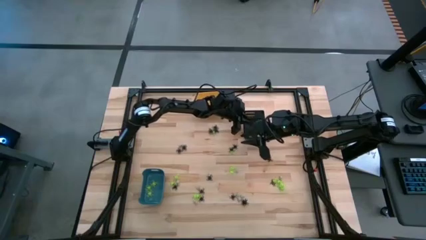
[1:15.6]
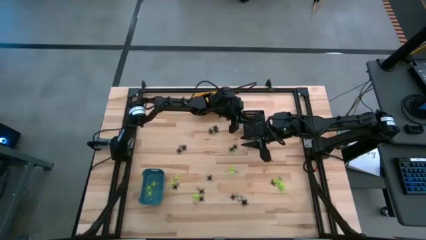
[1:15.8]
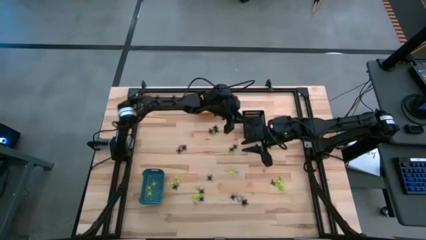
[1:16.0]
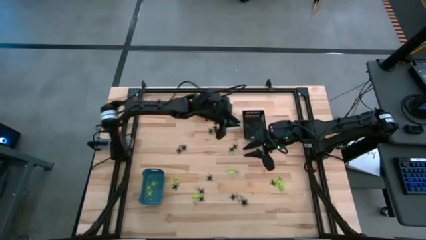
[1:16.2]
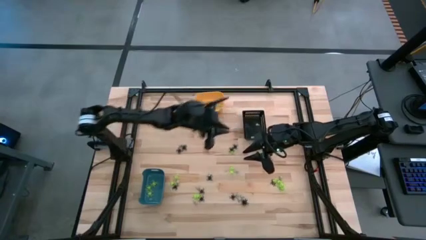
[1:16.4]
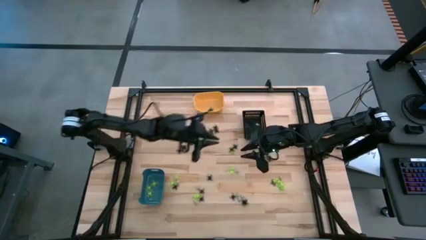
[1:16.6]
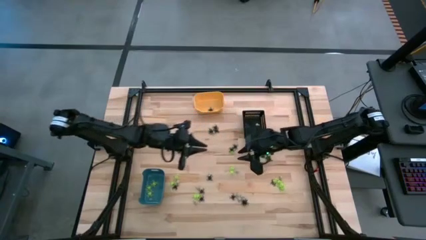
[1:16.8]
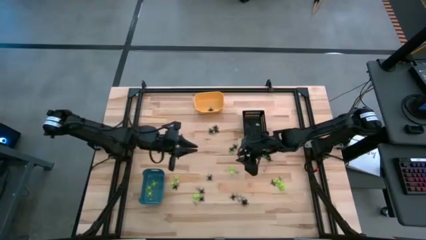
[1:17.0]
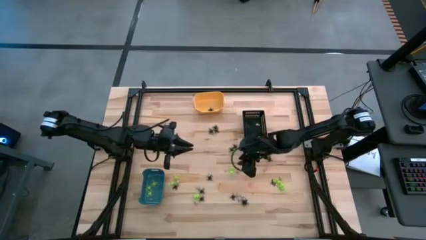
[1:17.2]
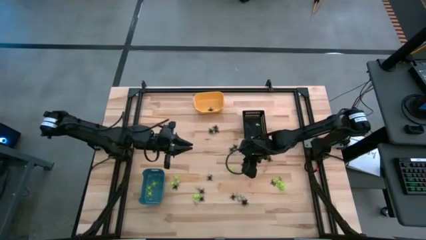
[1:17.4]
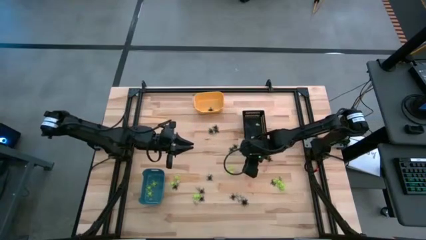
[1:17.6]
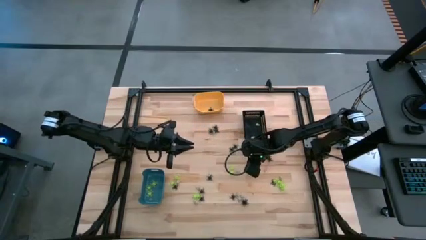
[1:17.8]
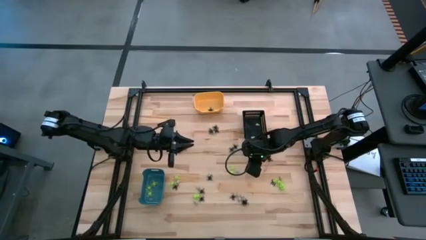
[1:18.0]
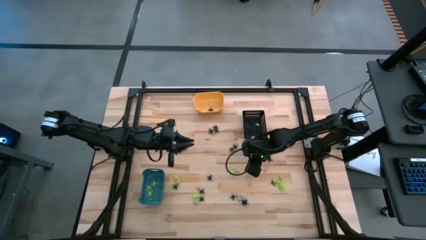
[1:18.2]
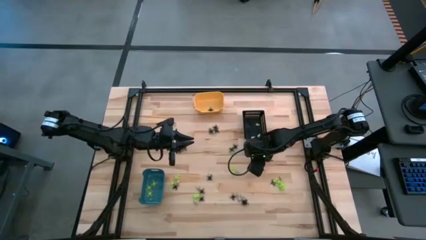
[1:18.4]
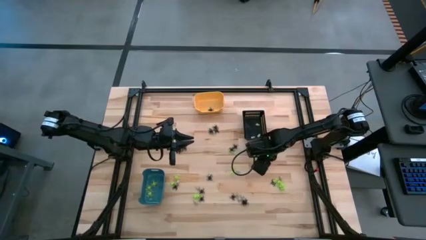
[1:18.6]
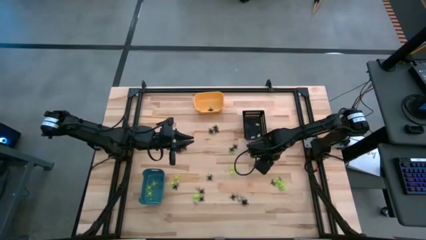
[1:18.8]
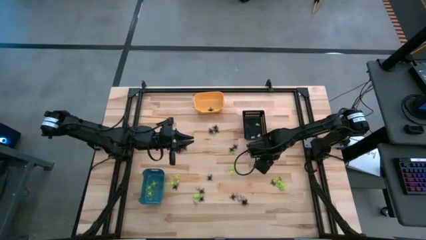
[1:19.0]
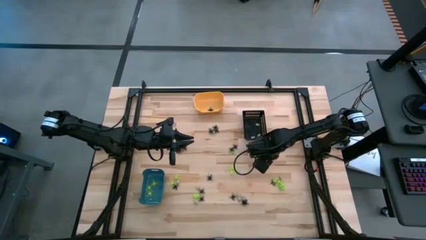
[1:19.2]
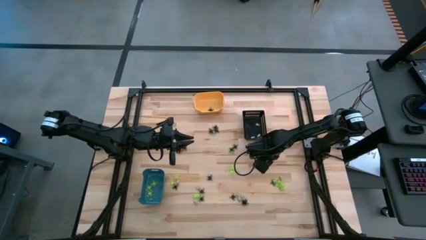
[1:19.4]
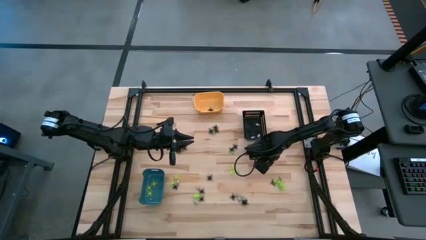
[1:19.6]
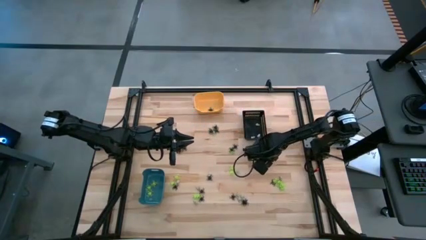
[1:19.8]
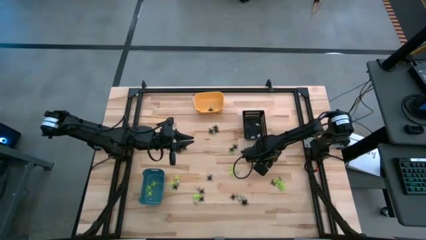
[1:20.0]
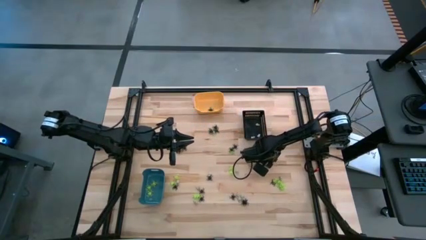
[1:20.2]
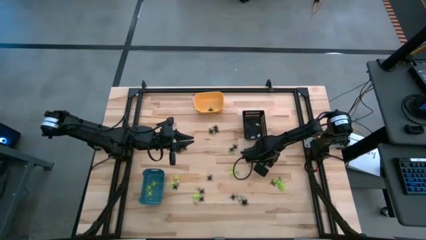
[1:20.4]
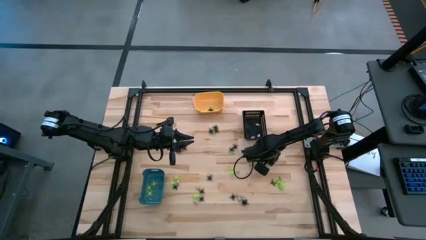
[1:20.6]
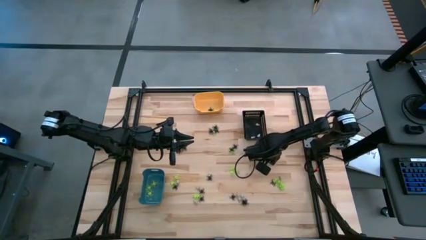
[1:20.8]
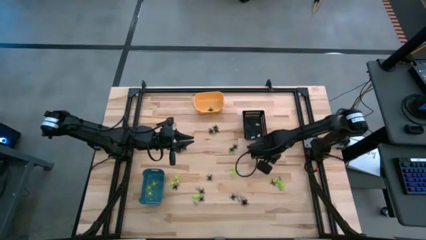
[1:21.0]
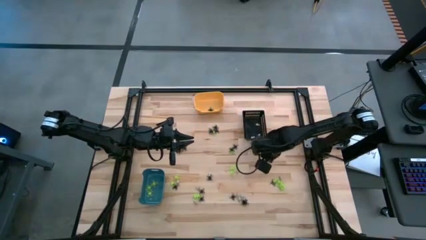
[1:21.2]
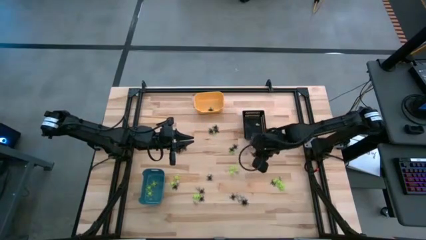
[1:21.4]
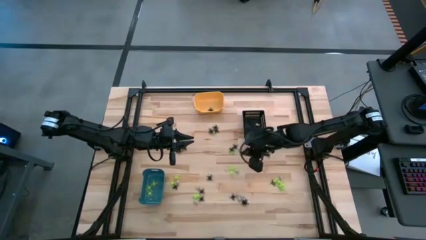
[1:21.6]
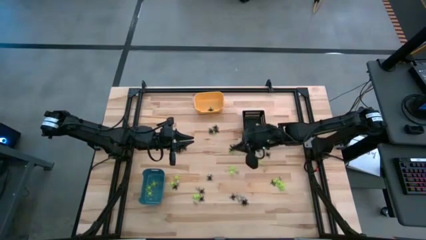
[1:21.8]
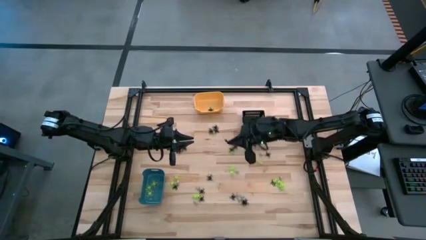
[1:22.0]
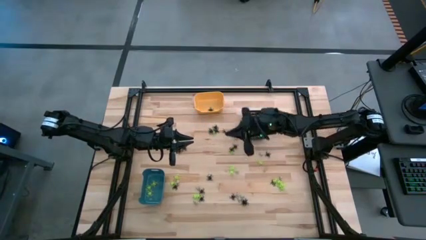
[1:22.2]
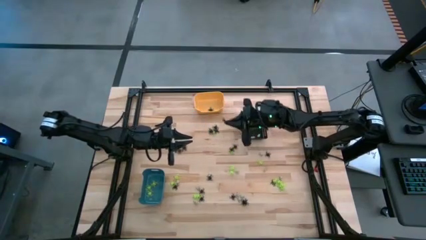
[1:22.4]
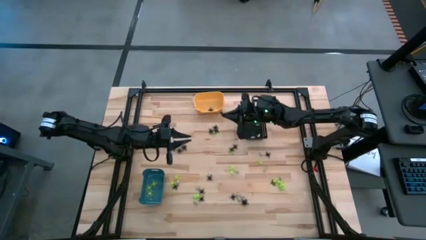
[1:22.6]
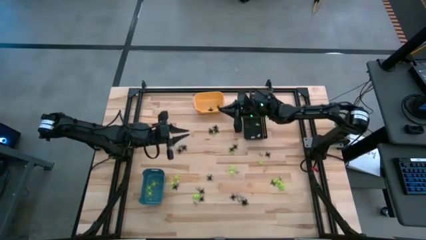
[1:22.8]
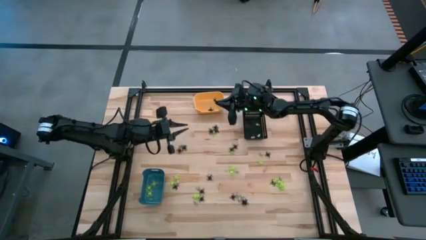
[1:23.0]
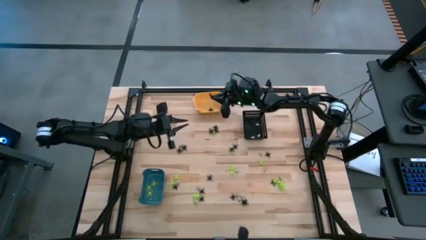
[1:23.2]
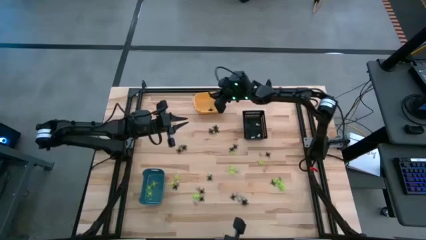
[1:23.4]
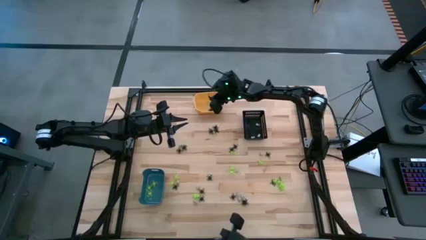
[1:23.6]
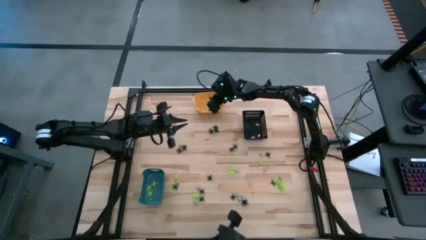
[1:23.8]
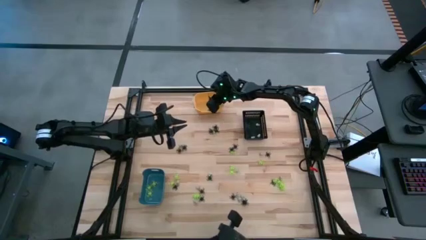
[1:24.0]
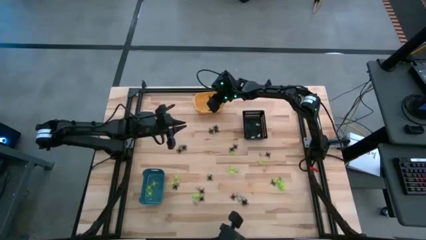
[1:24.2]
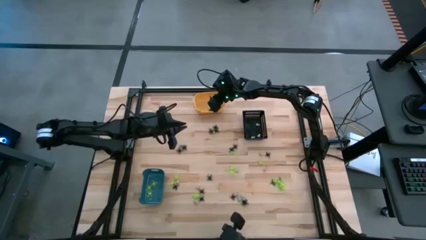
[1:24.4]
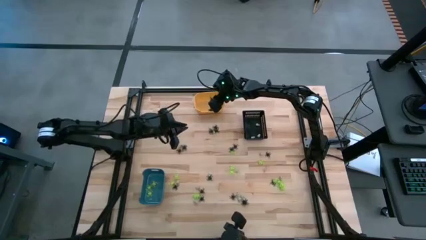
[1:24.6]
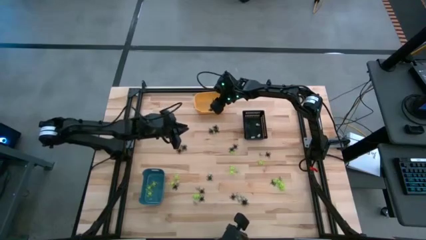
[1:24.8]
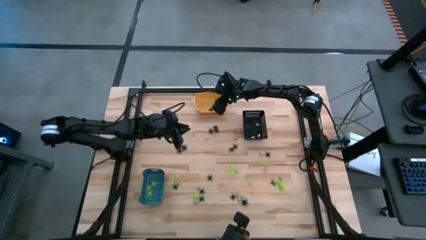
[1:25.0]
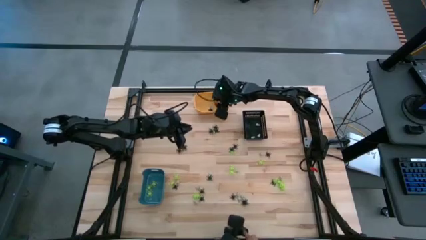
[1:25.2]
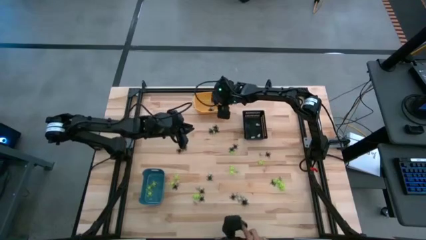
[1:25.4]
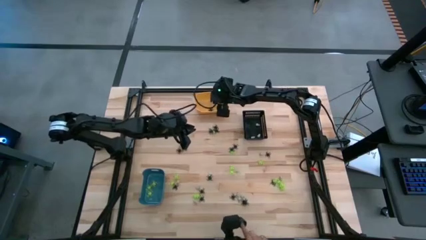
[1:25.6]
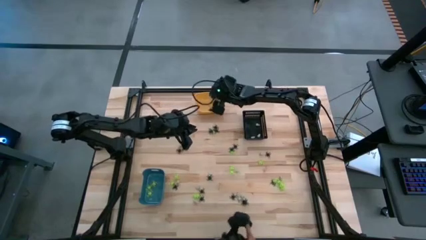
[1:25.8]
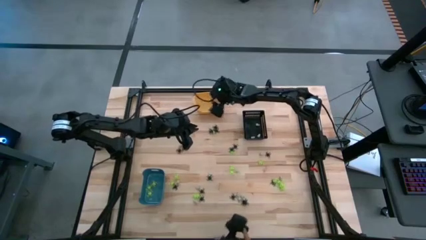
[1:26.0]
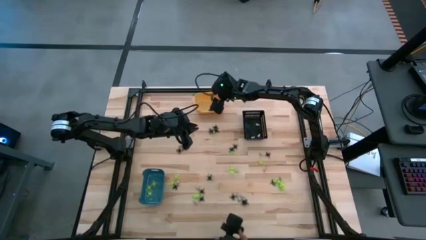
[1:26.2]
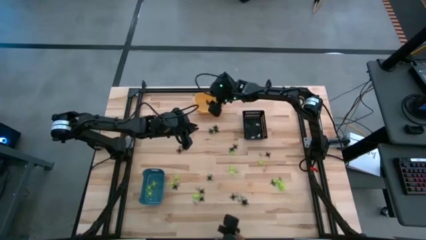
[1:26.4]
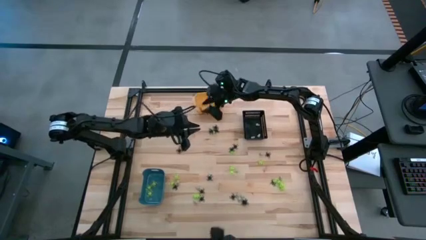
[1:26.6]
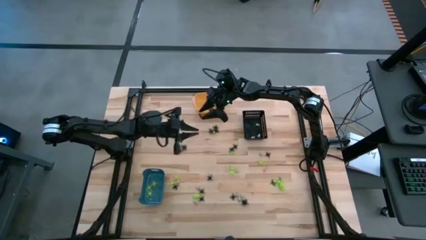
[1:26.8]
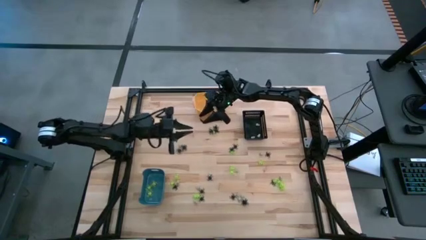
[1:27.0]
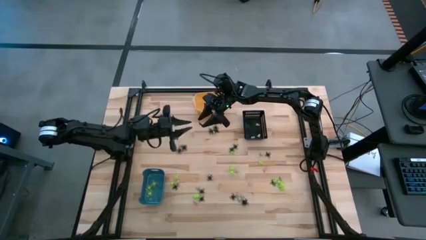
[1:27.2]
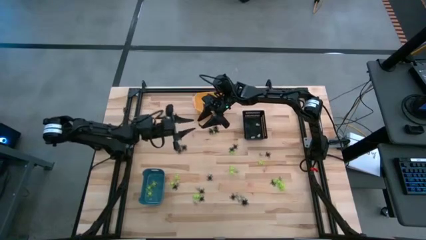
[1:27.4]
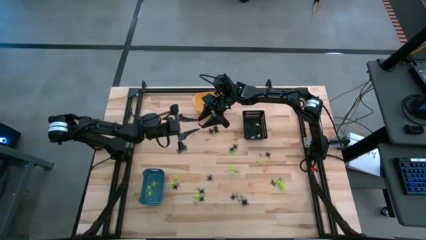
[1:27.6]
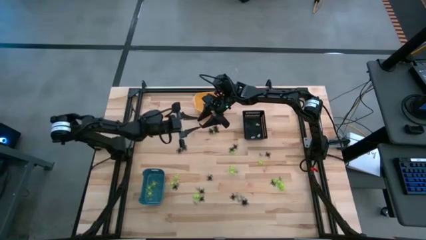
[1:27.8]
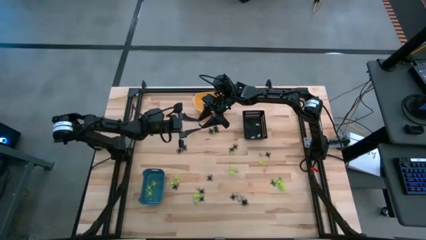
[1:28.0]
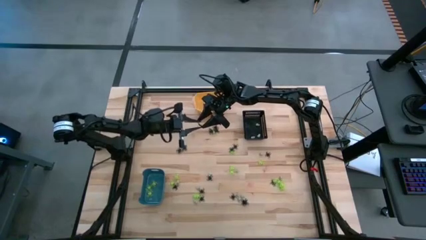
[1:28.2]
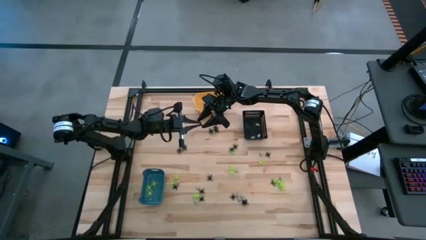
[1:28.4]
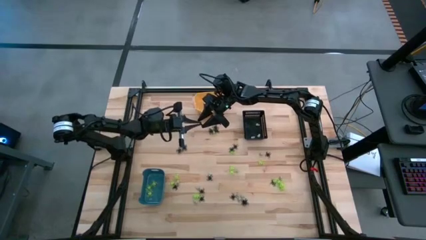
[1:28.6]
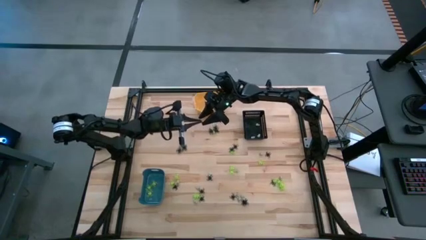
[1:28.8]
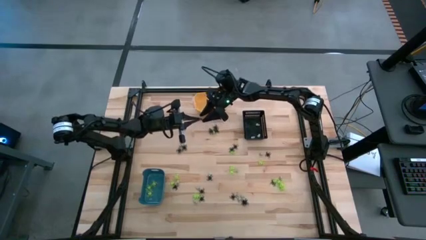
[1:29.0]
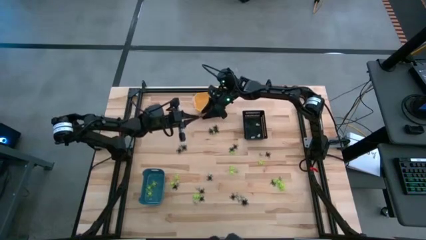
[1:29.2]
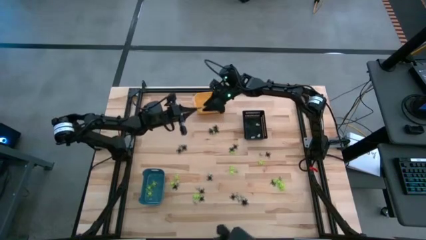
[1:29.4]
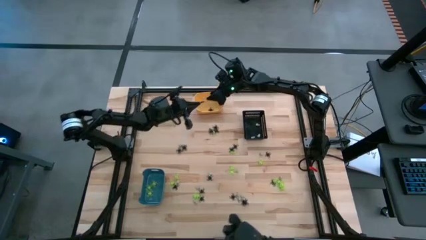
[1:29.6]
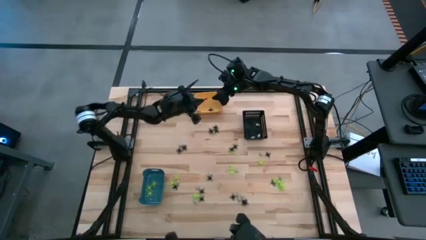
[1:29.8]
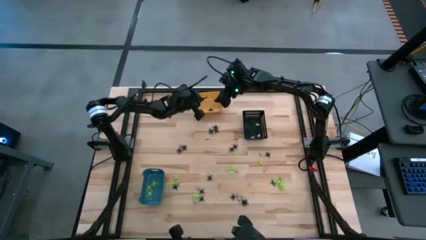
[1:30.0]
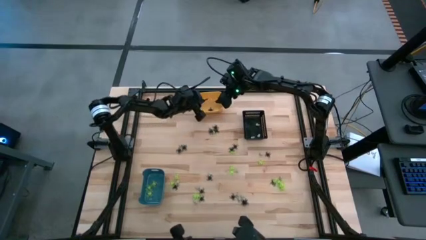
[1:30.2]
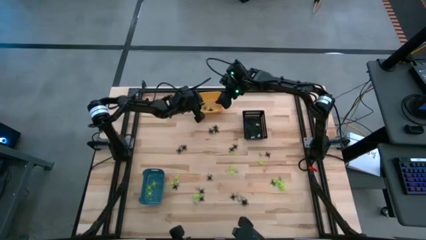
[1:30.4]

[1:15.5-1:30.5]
Task: Sort Halloween decoration
Put the black spider toy into the yellow bin

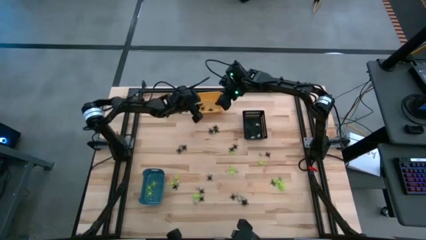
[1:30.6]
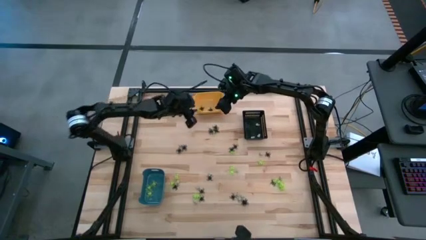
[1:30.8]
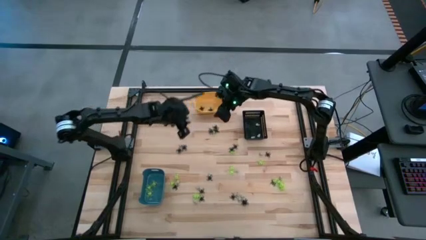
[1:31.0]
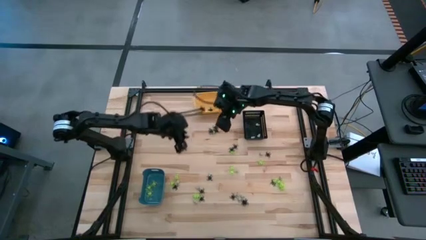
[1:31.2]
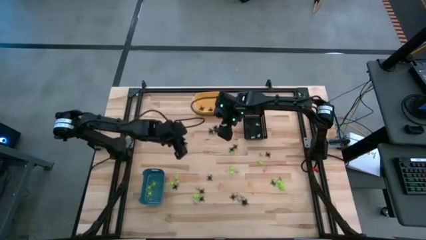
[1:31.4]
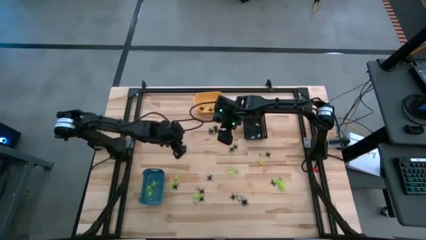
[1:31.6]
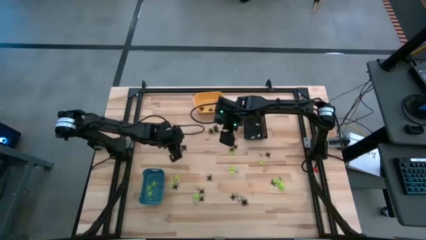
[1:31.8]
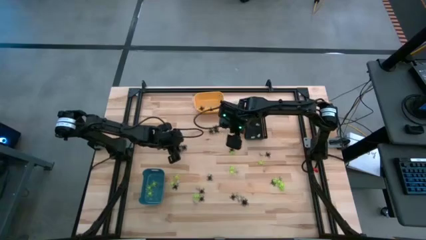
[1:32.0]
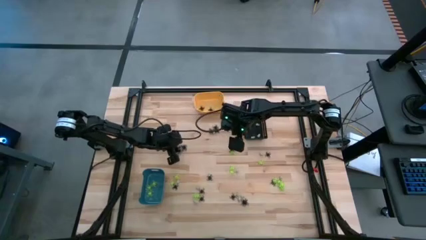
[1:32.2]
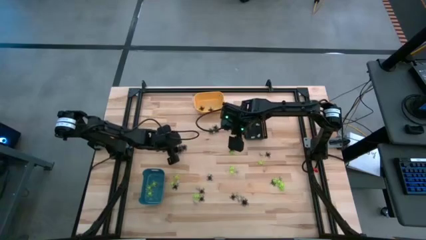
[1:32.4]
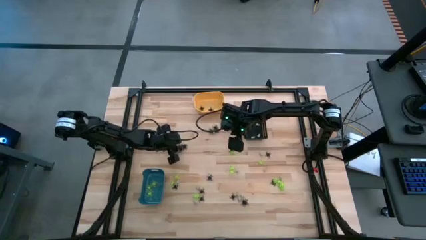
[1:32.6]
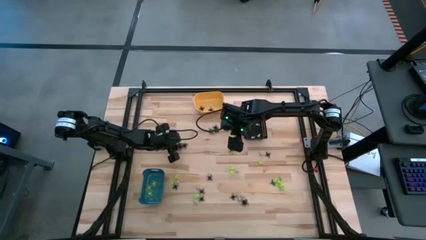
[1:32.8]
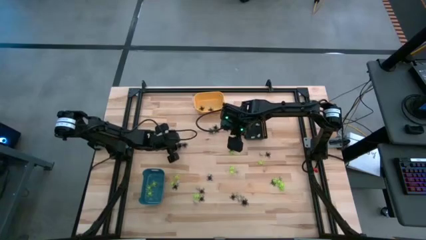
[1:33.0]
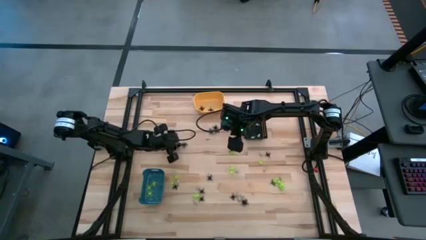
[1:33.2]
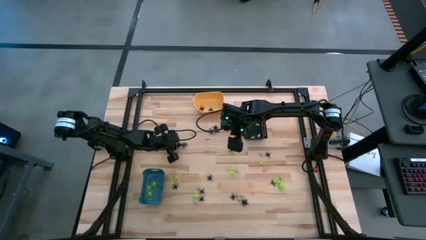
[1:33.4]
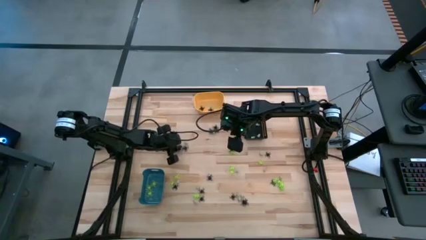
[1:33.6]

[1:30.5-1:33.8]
Put the white skull toy into the black bin
